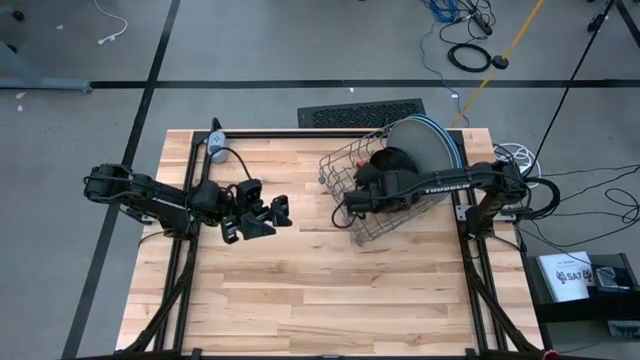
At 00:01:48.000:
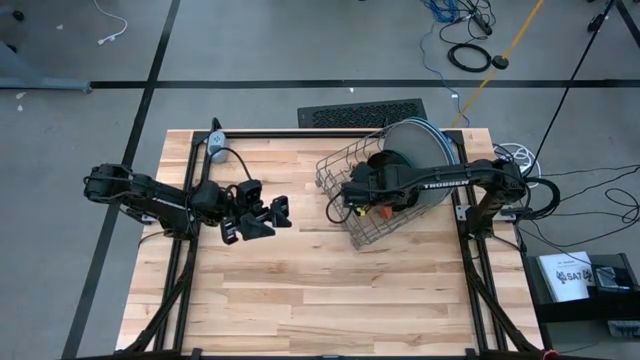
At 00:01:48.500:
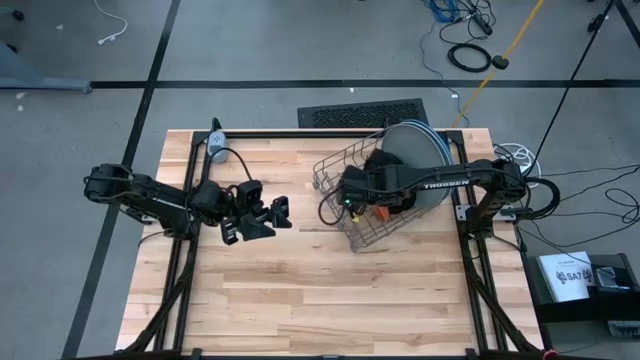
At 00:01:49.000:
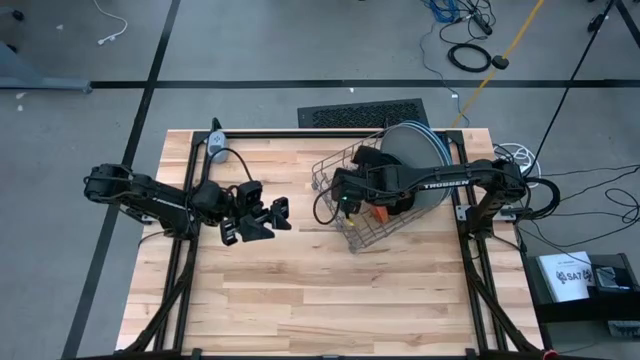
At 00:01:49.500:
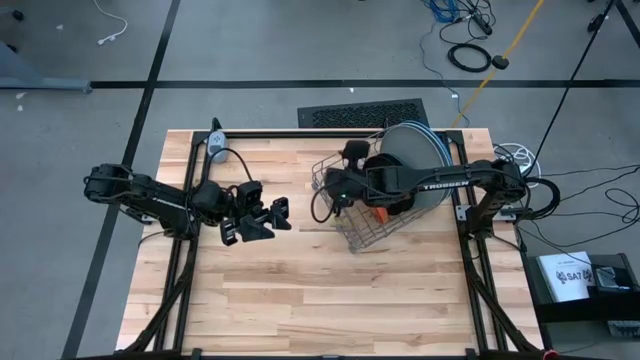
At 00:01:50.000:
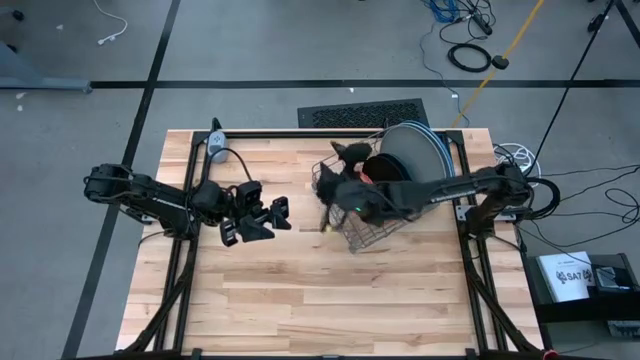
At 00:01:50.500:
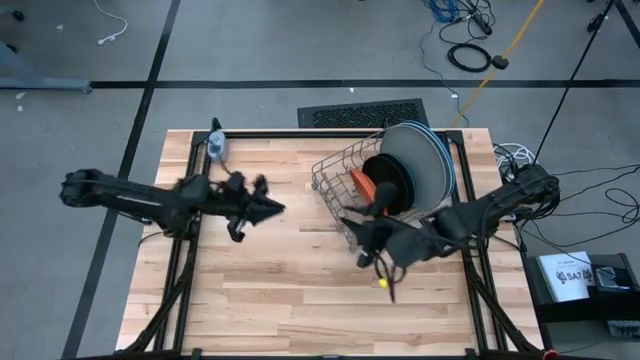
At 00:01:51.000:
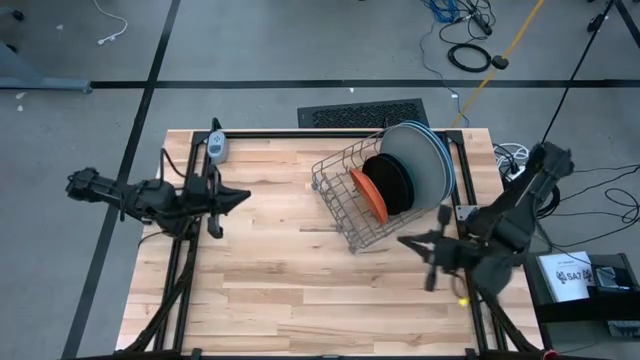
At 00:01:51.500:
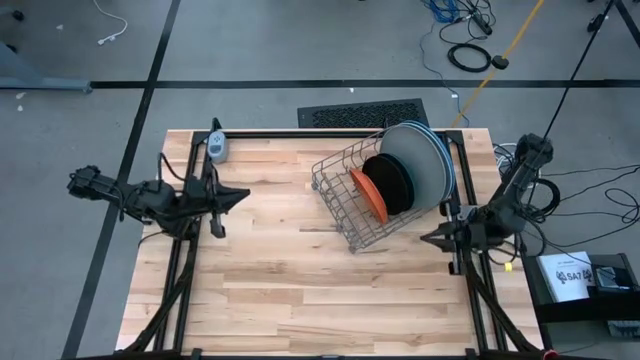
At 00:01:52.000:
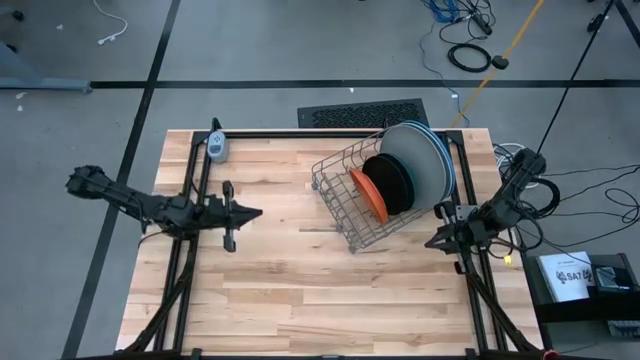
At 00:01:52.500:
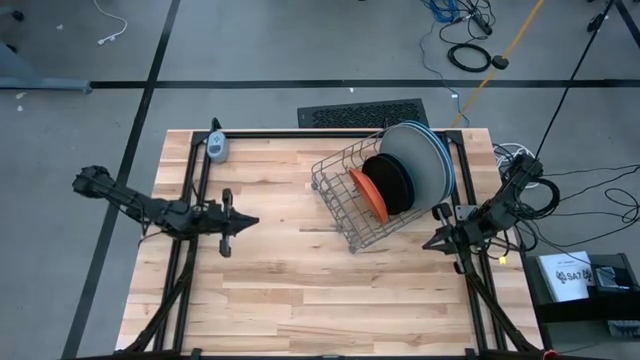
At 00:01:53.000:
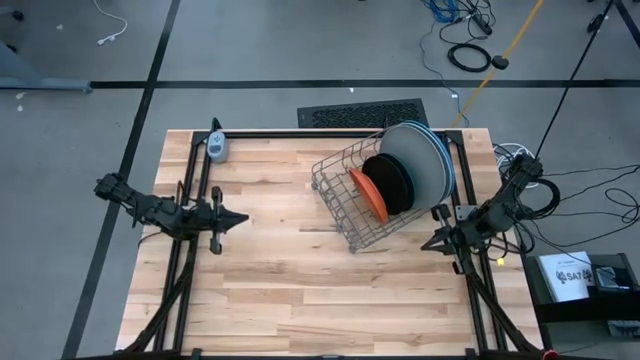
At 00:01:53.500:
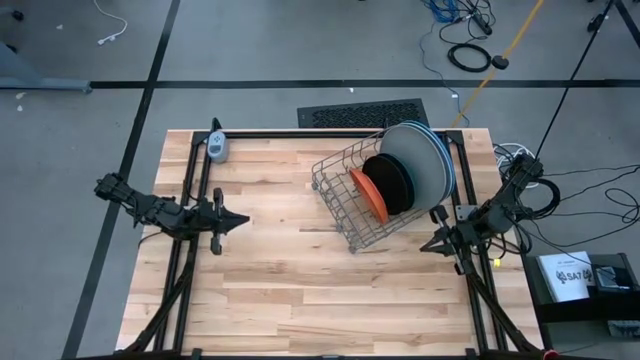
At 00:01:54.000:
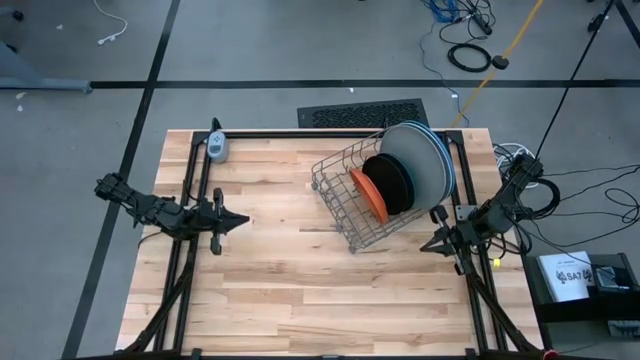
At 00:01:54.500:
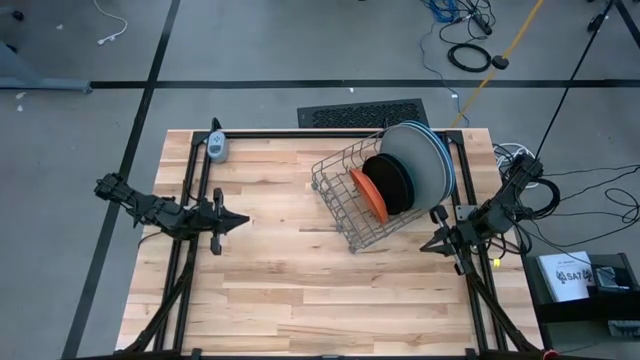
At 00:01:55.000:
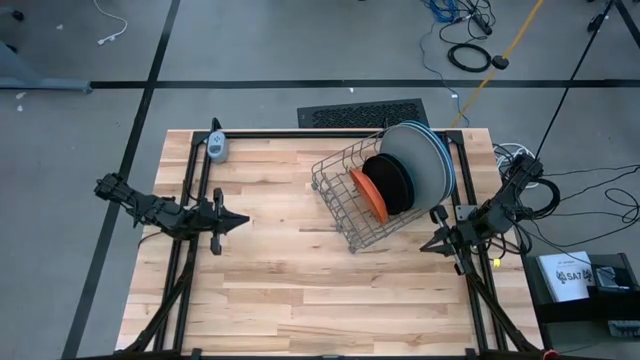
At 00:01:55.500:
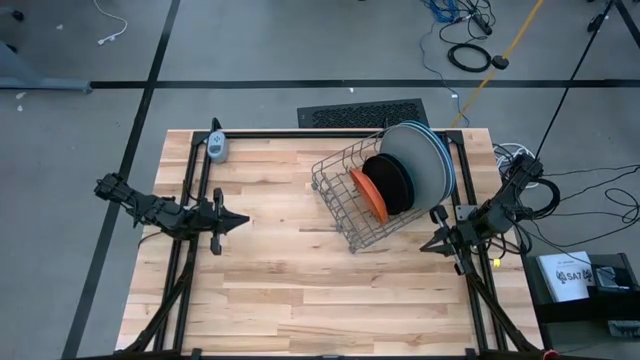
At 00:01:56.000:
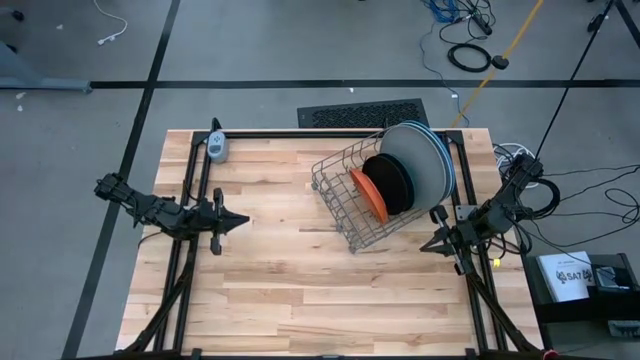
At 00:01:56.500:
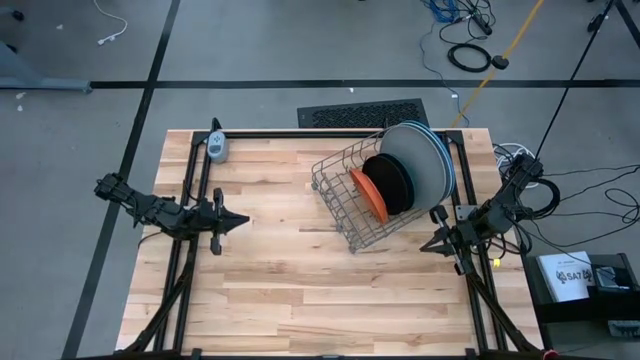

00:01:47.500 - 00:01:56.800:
Task: Sort dishes
Return to Home Position

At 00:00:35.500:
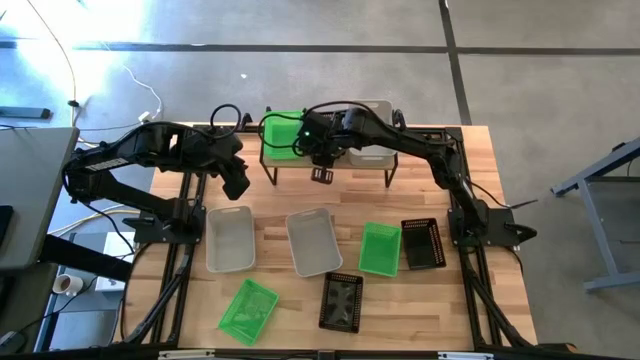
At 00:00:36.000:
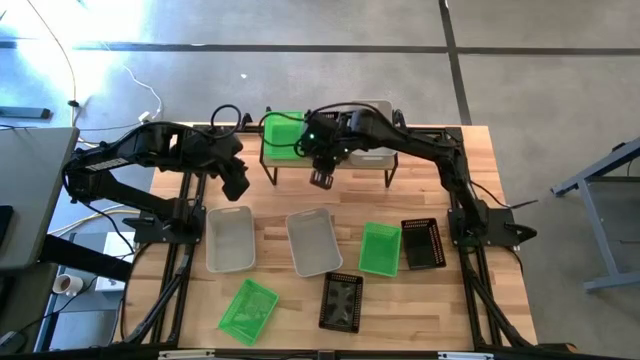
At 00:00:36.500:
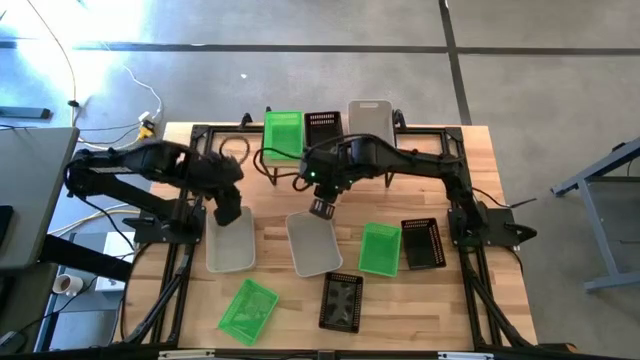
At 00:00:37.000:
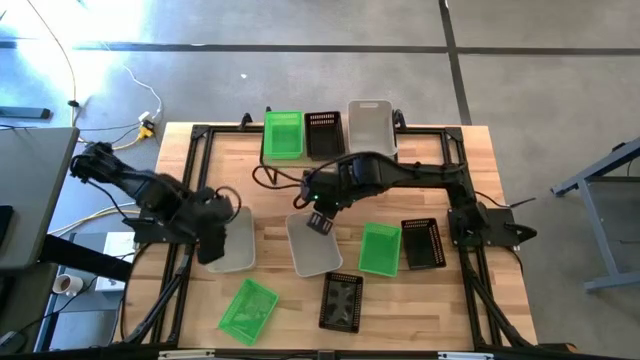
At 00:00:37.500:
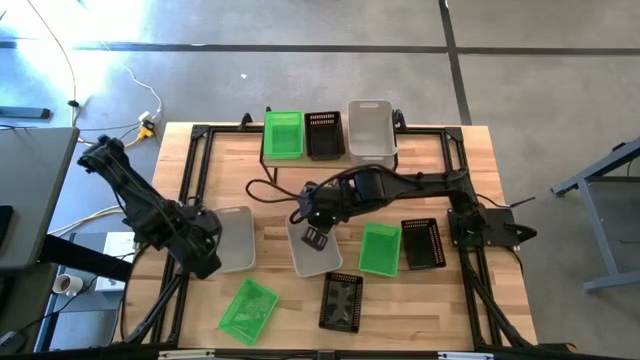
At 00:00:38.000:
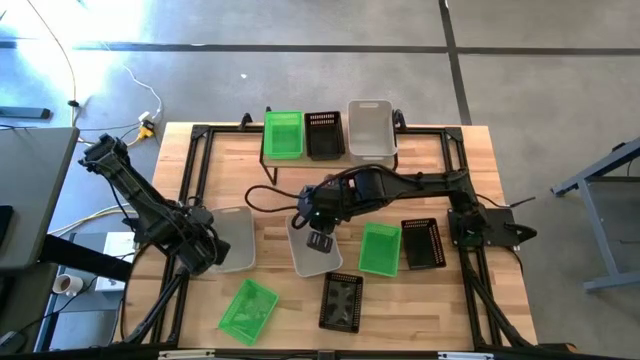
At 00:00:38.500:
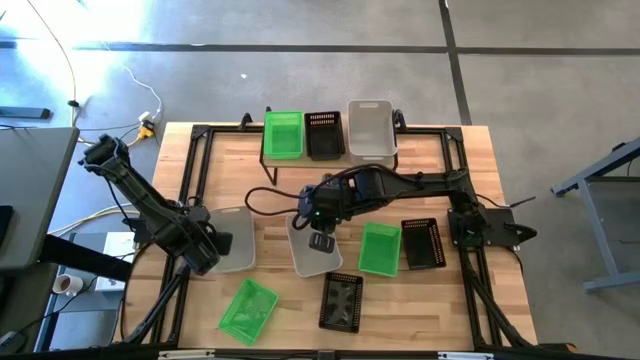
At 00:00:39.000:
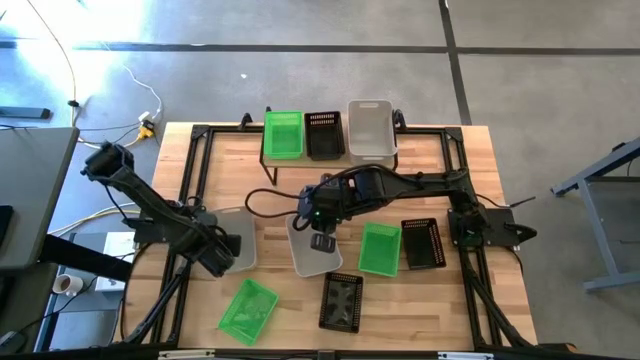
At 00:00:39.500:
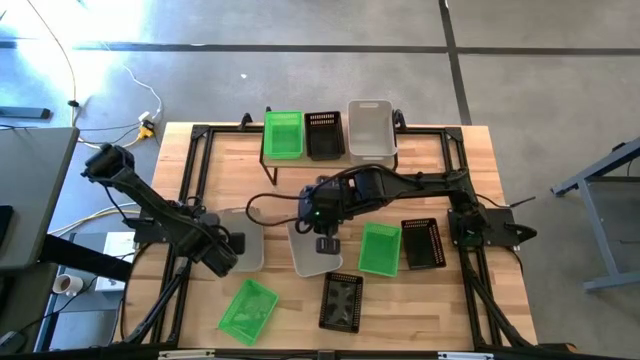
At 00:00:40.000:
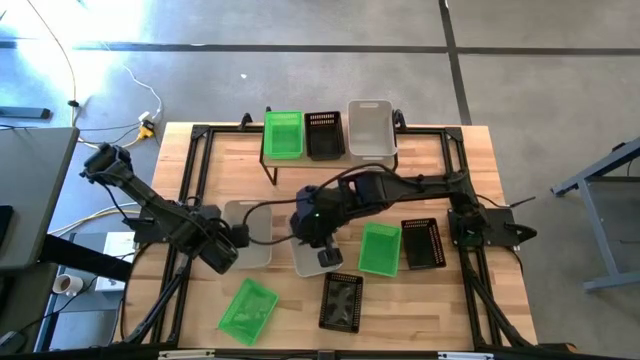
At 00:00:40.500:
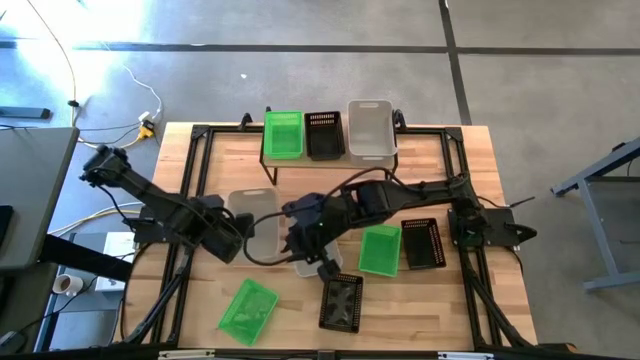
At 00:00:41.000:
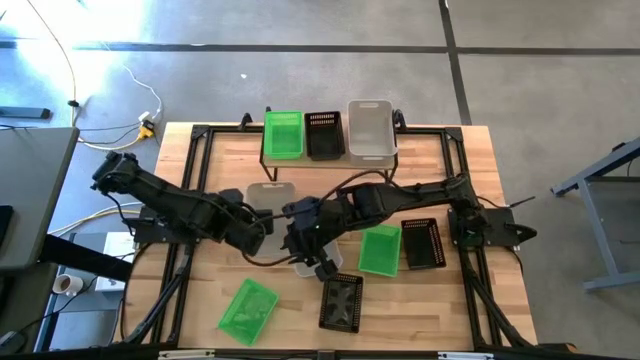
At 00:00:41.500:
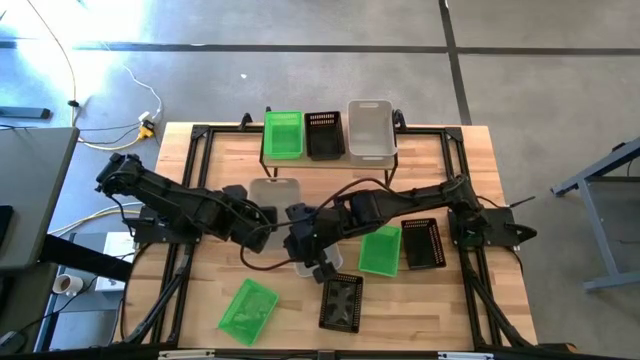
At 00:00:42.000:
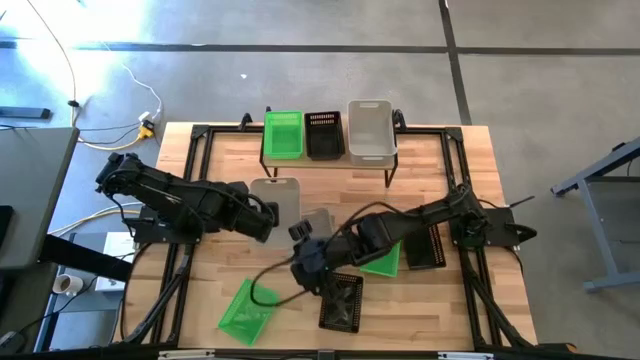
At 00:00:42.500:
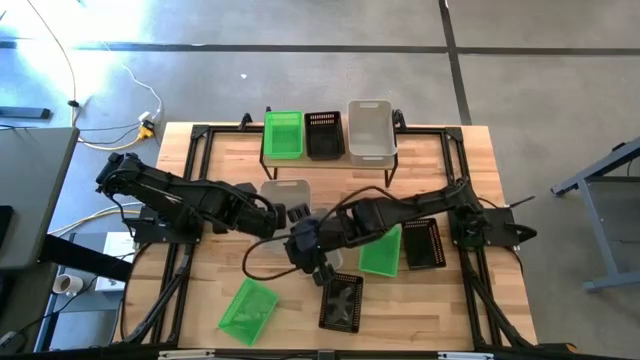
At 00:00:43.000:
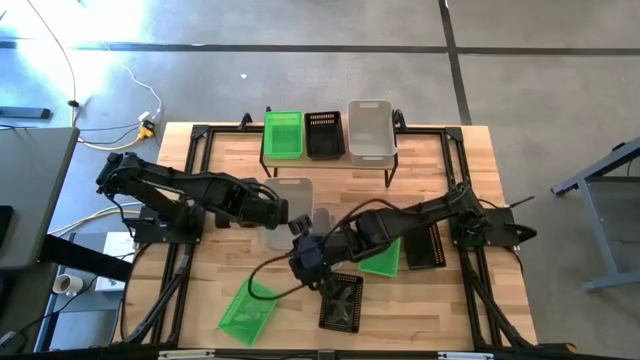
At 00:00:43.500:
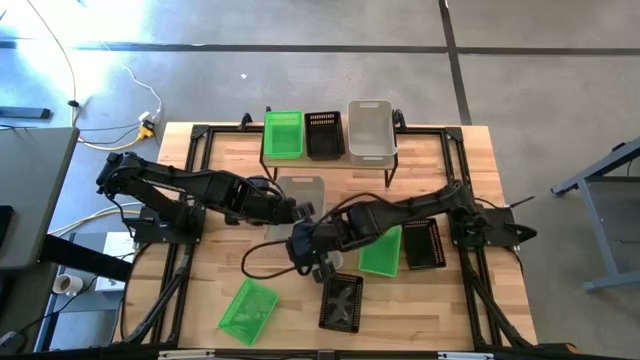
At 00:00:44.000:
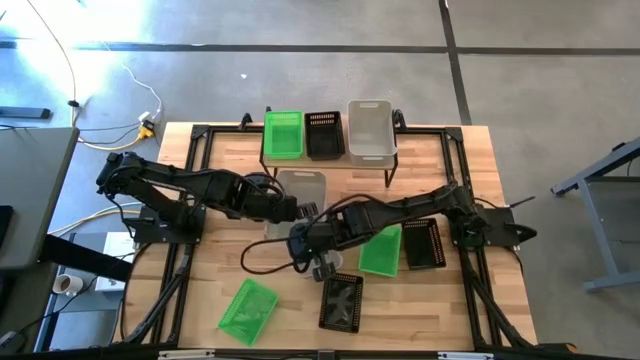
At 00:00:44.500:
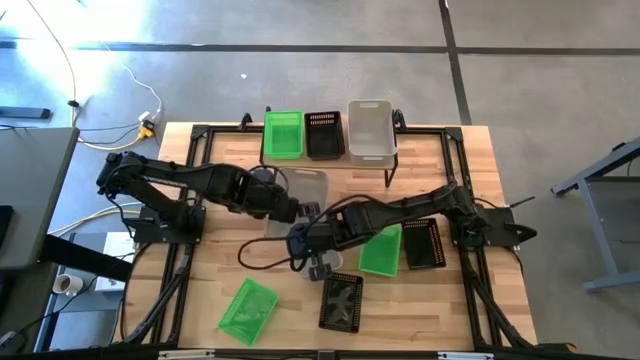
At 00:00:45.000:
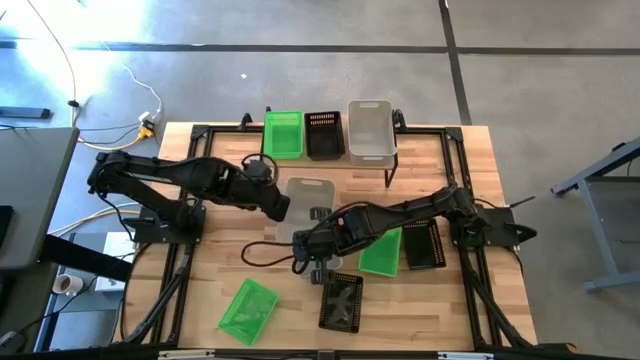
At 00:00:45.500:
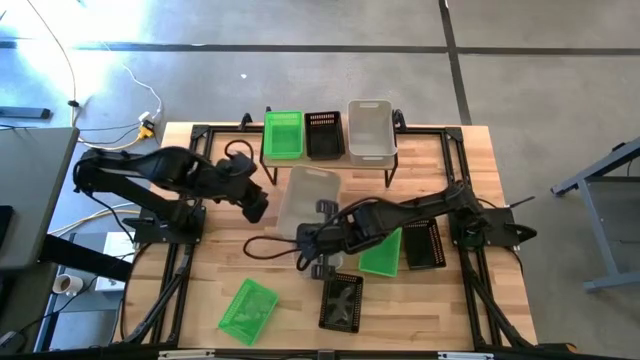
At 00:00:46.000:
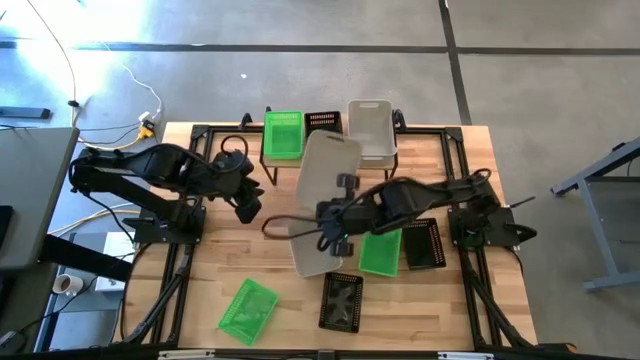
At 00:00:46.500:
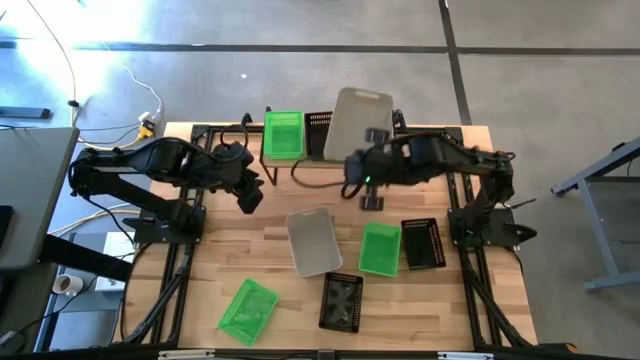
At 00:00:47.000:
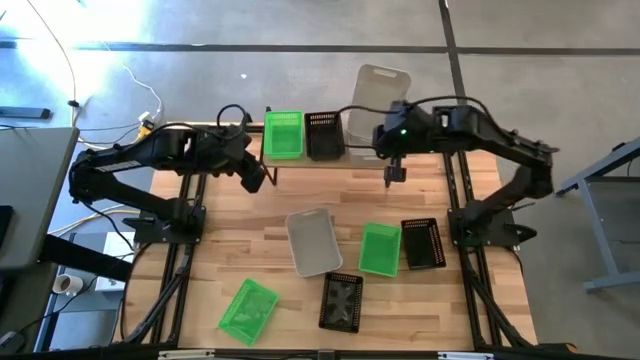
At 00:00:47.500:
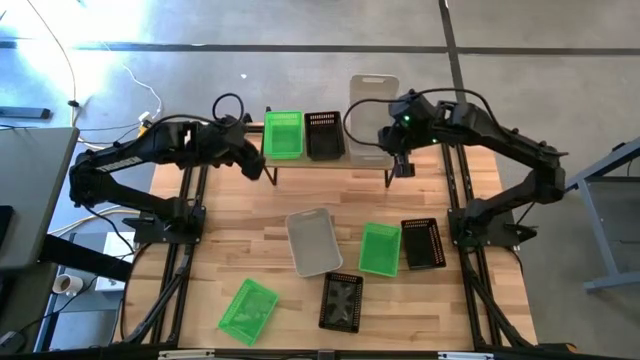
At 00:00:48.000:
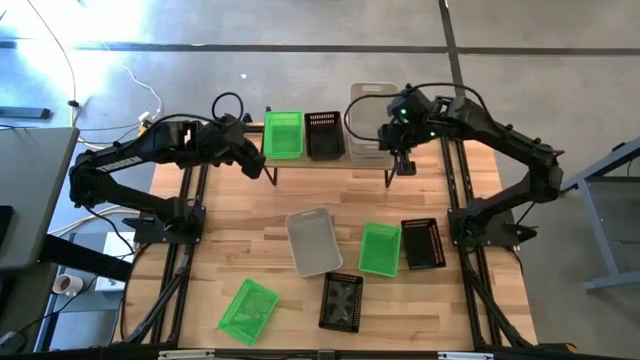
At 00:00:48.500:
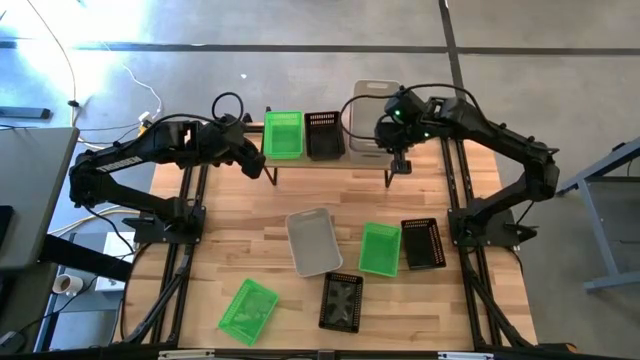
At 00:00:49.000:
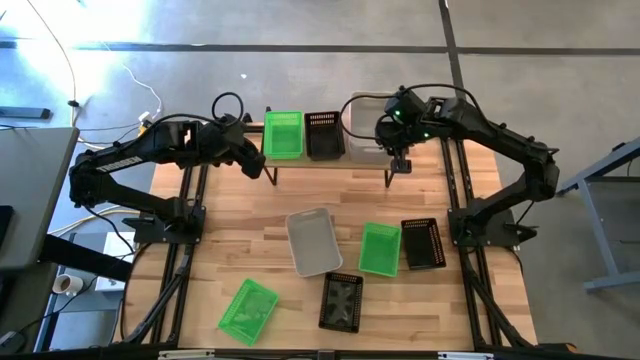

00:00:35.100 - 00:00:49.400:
Task: Stack baskets on shelf by color
Stack the left gray bin on top of the gray bin on the shelf
